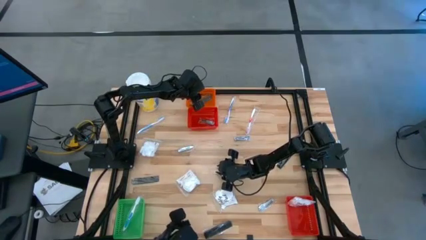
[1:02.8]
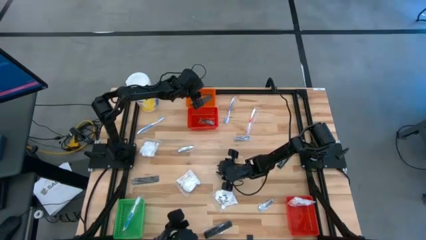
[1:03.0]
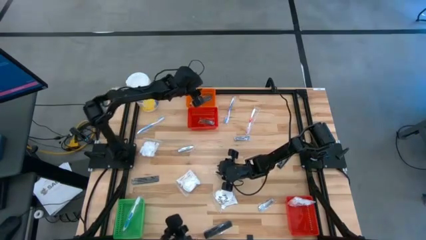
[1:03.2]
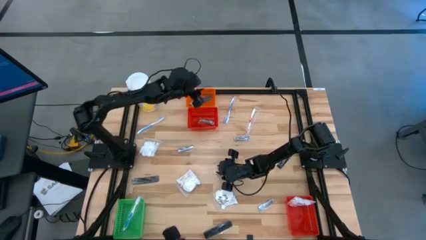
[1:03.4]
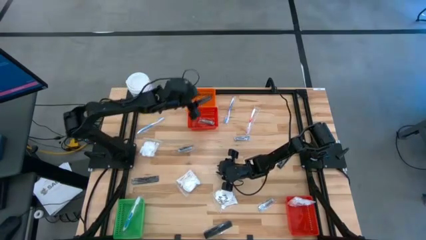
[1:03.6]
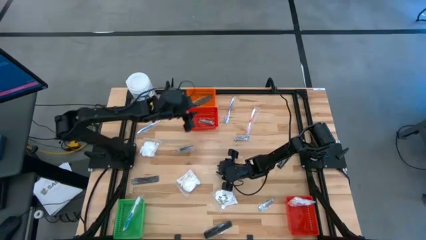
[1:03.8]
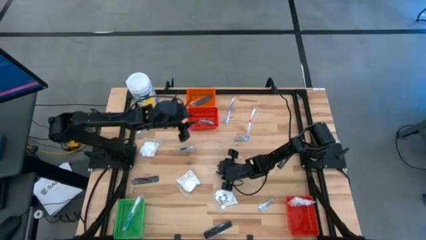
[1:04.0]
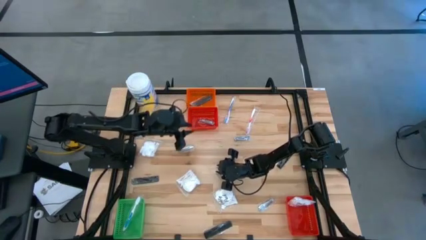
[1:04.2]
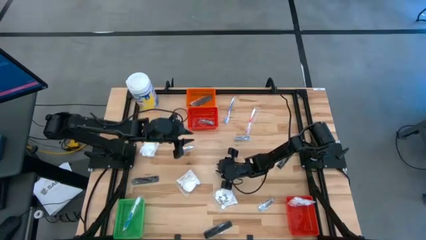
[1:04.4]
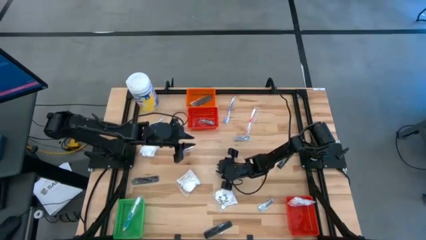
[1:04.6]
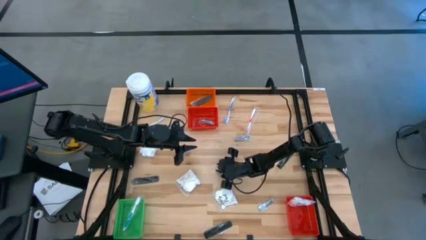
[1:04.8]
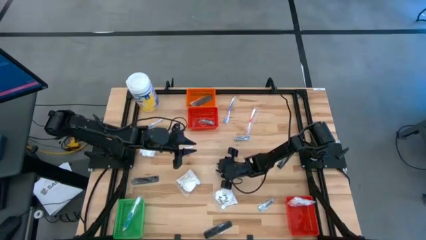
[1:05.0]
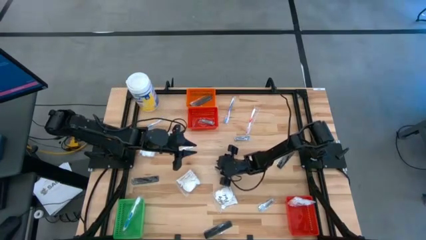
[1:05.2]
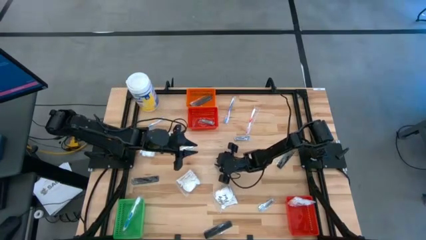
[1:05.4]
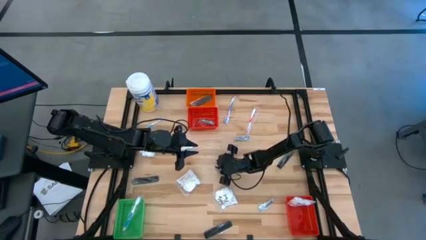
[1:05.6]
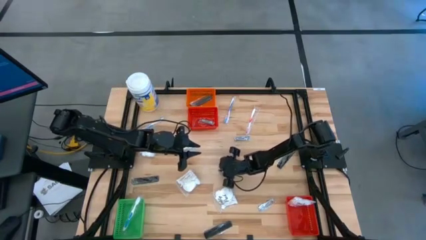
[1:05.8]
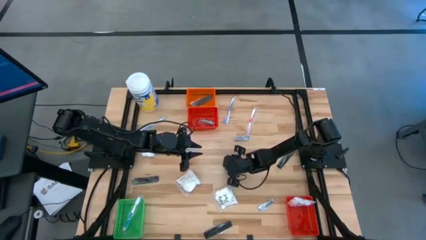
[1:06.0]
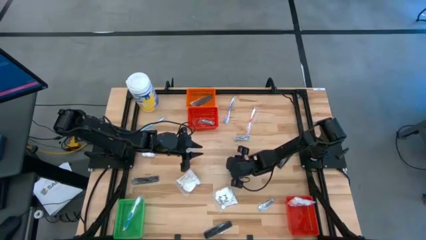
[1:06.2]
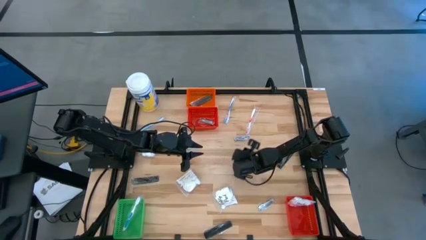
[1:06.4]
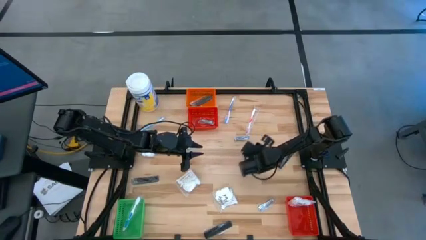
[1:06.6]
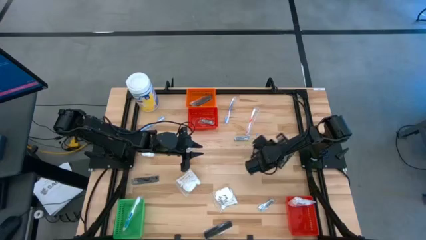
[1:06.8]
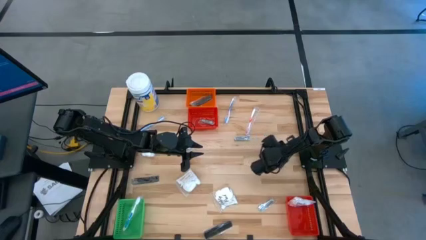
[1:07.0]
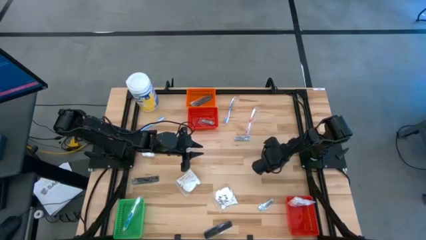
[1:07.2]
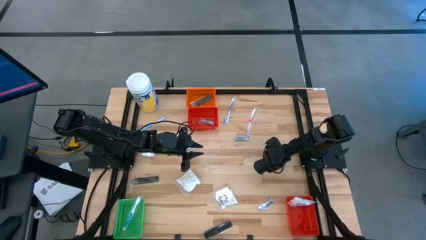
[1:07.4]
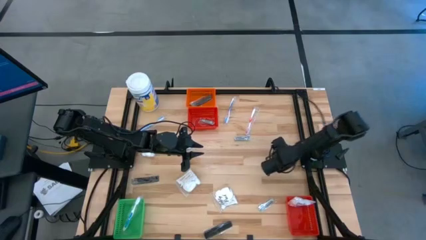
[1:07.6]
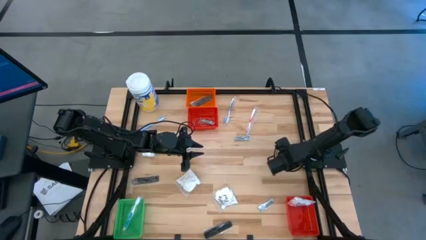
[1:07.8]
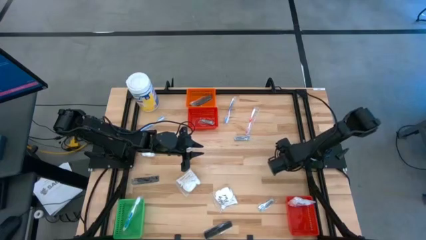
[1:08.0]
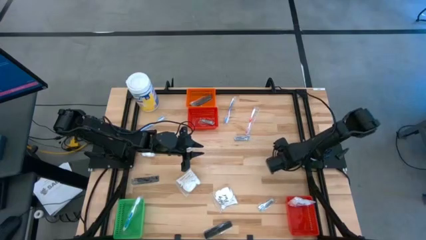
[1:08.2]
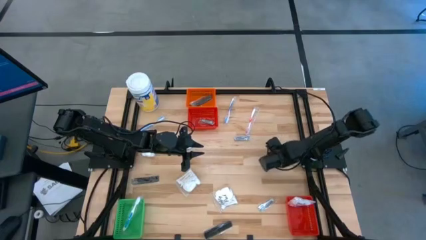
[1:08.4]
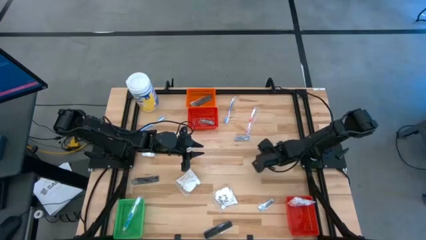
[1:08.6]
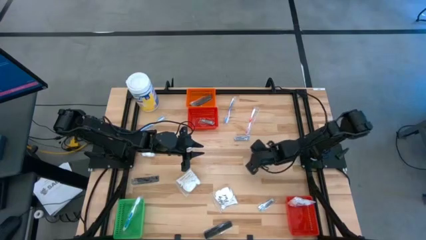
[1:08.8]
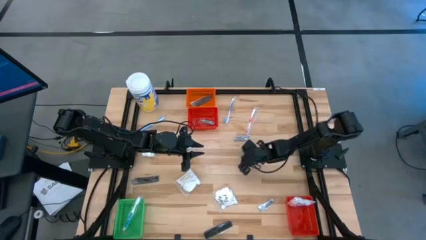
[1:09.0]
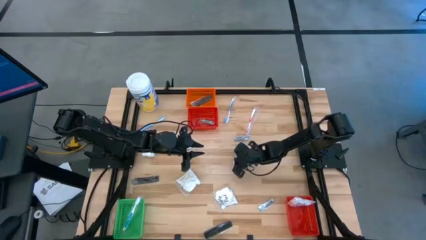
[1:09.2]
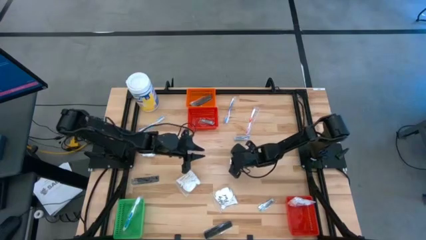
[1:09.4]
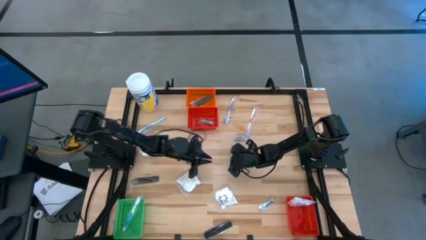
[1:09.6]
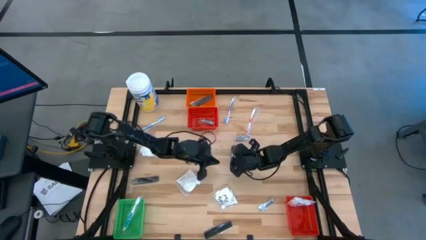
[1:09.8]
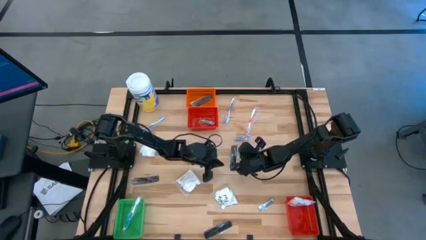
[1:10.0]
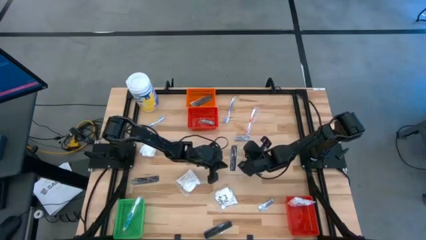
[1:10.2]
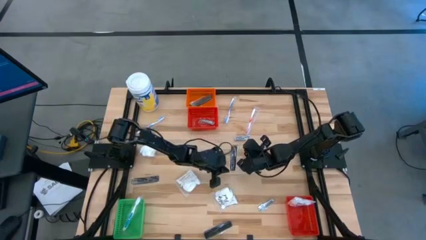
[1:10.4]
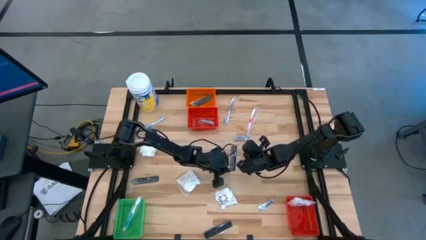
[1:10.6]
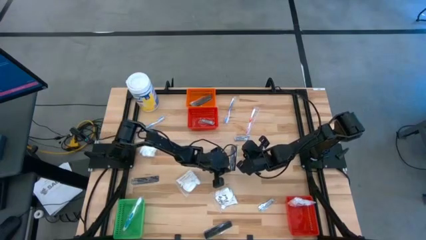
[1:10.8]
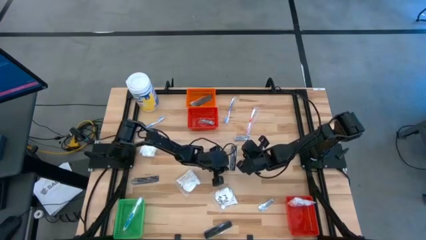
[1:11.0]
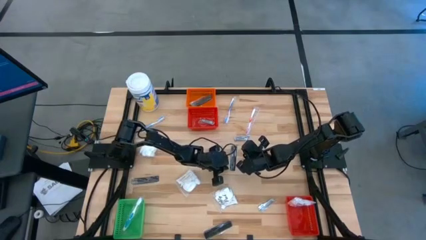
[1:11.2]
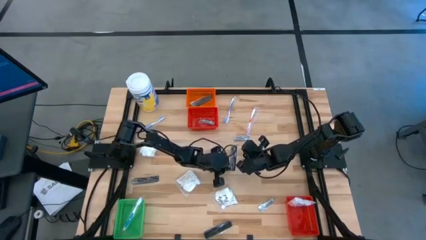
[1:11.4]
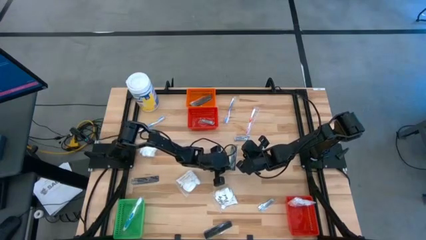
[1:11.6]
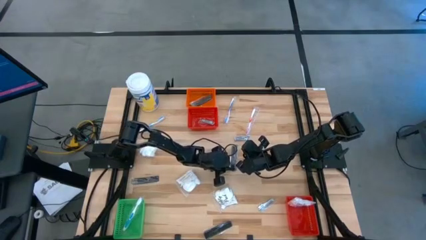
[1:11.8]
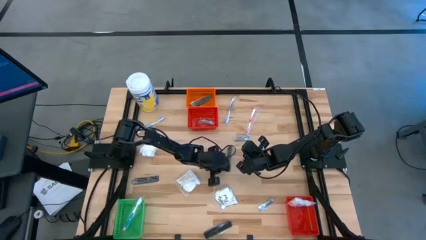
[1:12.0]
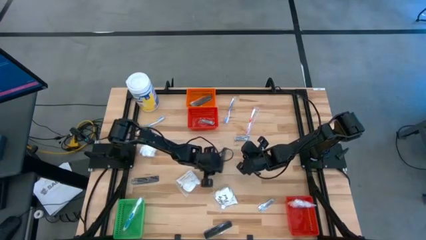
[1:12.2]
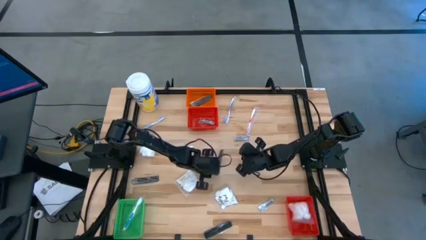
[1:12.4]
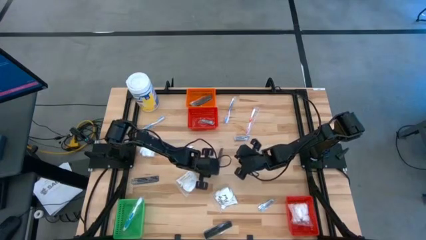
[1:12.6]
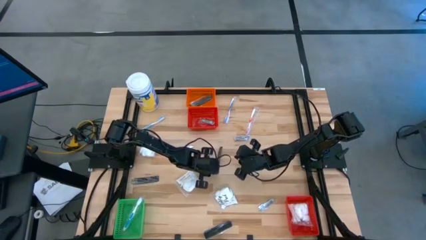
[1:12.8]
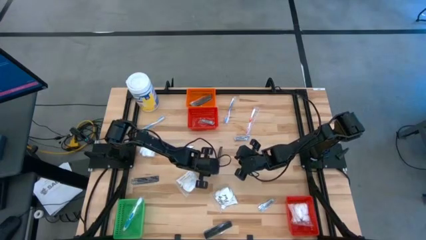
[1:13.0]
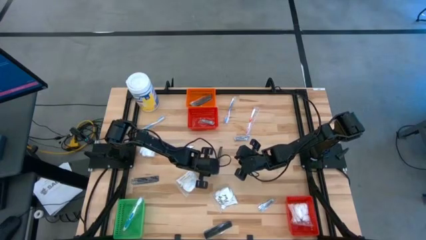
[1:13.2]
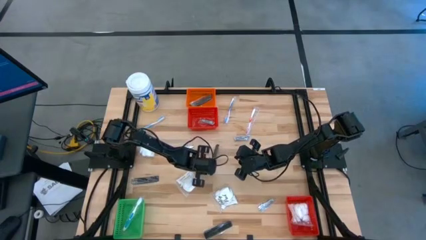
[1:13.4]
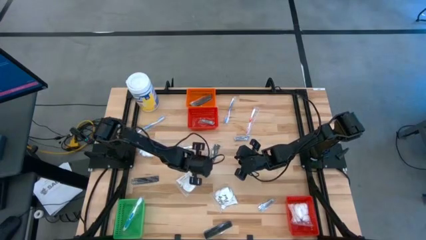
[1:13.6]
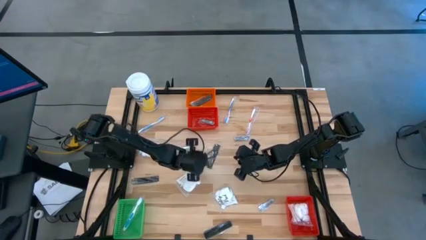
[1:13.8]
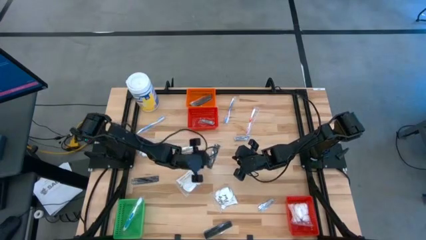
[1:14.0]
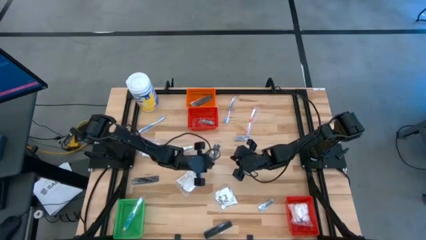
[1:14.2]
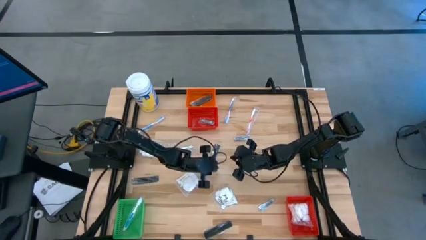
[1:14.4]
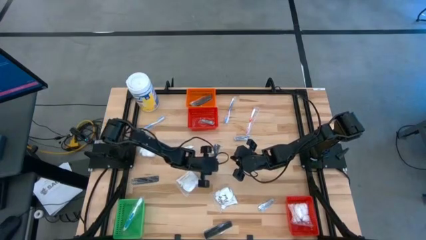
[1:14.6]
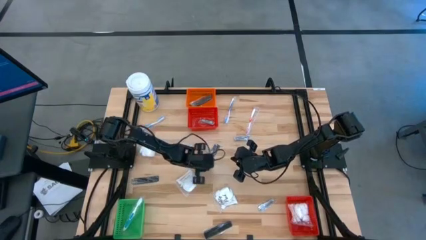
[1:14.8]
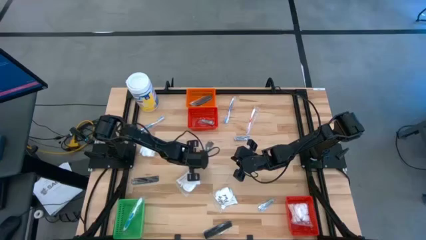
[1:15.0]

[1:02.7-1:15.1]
Task: Pick & Place Travel size toiletries
Put the comb into the orange basket

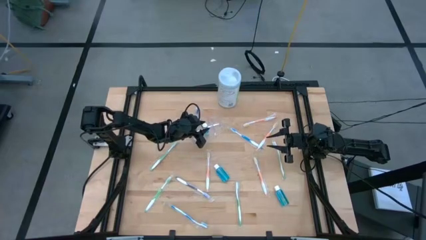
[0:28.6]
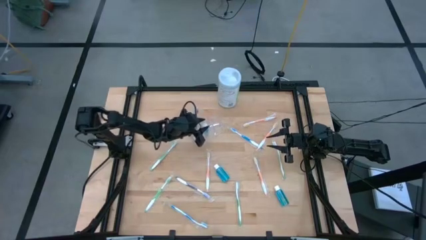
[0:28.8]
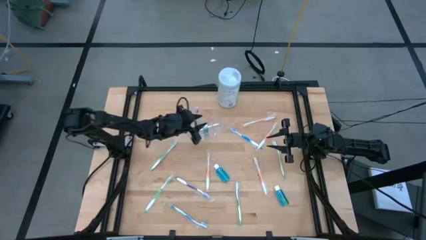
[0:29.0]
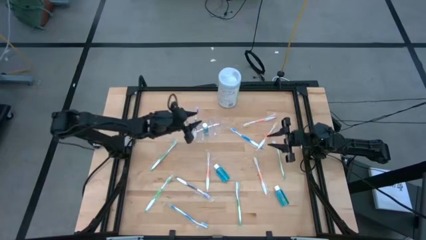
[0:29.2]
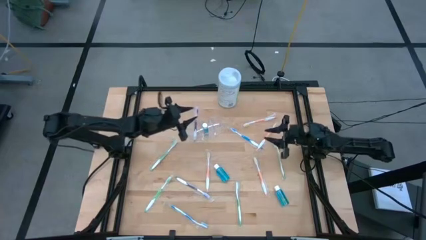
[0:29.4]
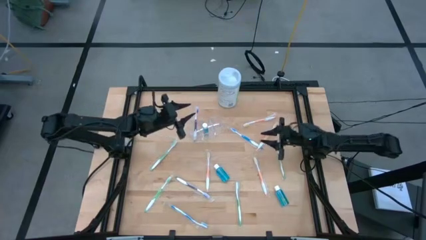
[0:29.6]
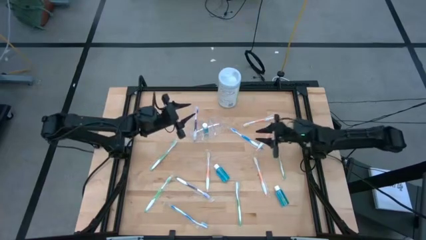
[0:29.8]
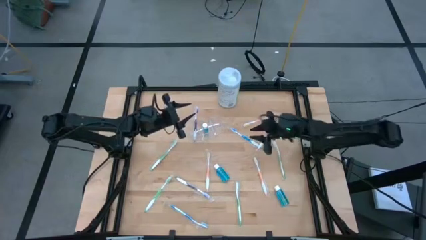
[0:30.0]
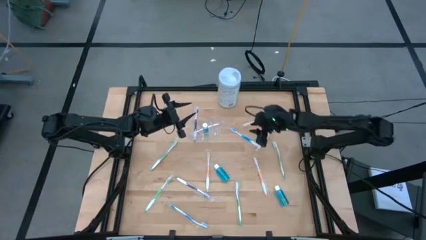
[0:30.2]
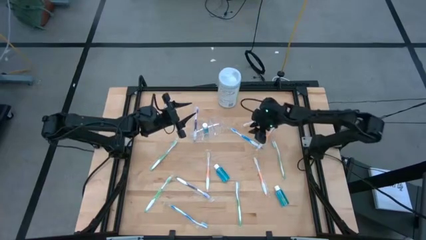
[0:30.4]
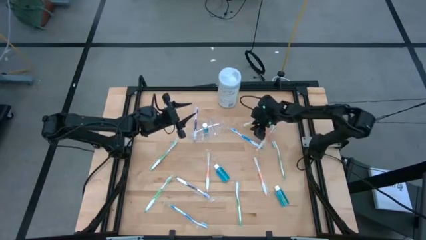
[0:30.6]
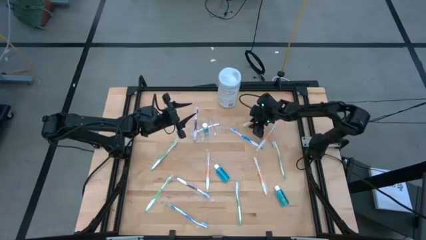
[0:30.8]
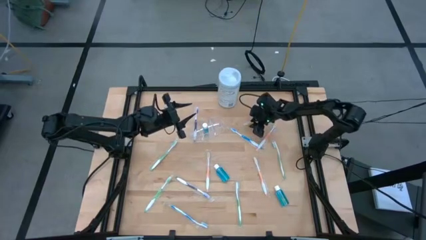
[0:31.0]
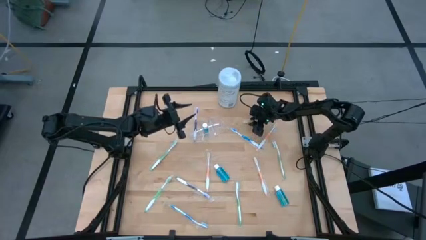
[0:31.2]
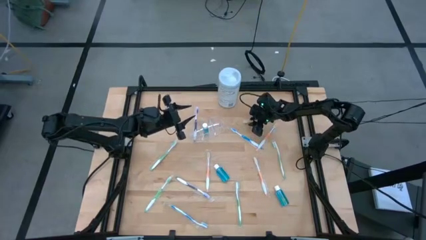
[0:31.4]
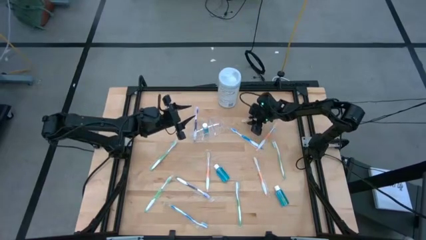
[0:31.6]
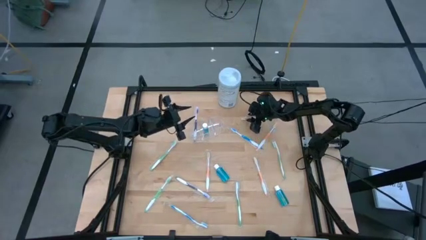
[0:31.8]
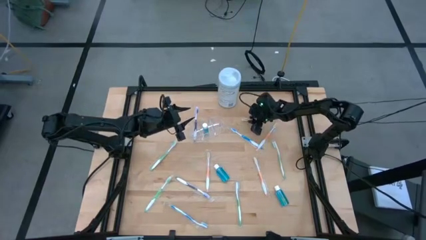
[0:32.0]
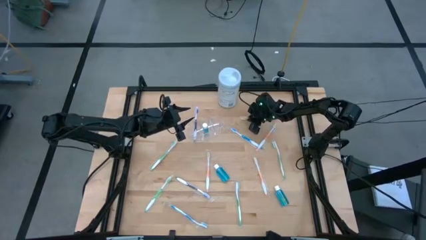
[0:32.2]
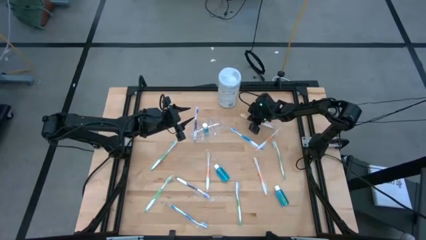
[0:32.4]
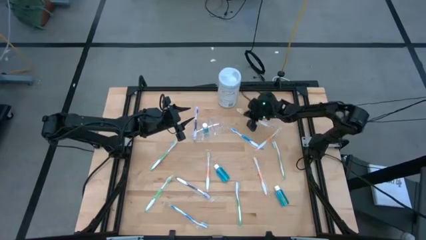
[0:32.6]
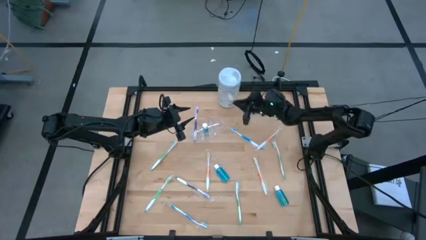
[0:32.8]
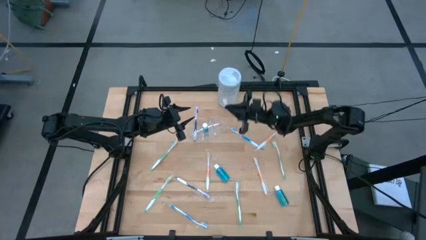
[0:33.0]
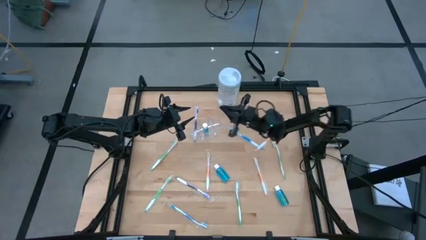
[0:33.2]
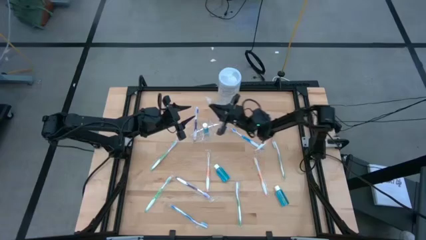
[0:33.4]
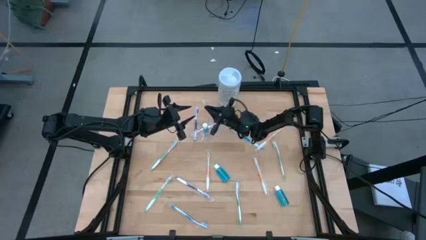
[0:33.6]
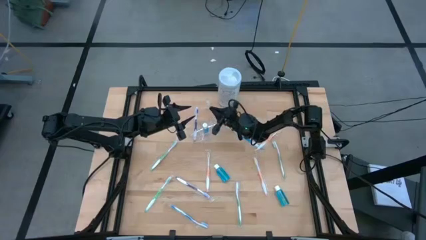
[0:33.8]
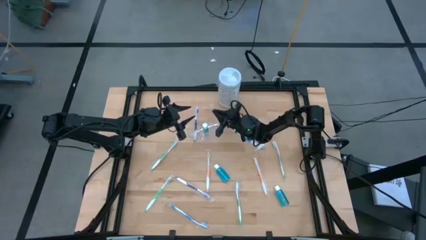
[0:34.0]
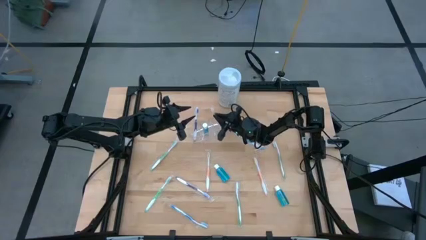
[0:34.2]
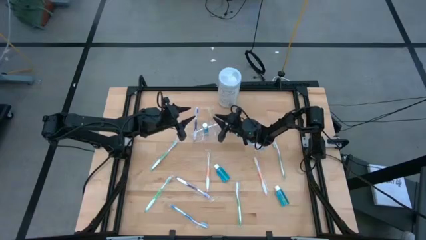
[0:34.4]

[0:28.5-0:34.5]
Task: Pick & Place toothbrushing station
Put the orange toothbrush into the transparent organizer
